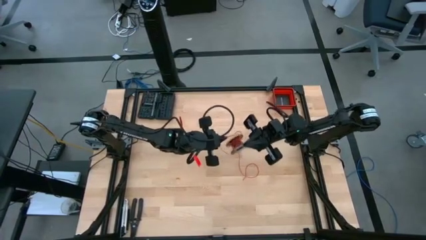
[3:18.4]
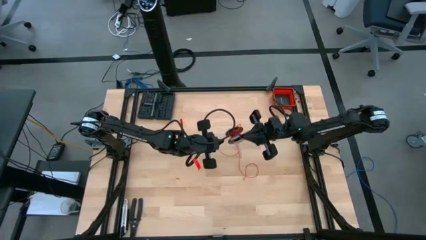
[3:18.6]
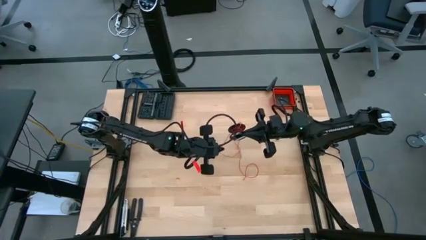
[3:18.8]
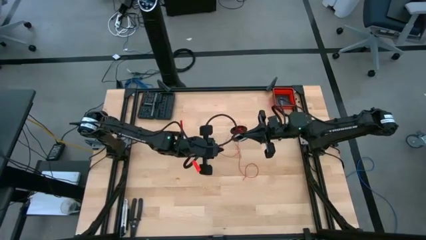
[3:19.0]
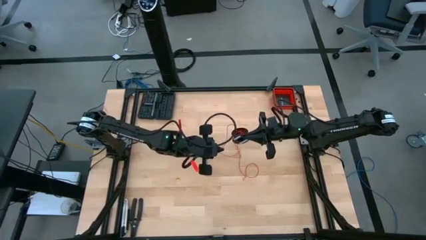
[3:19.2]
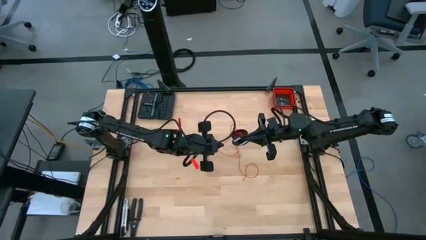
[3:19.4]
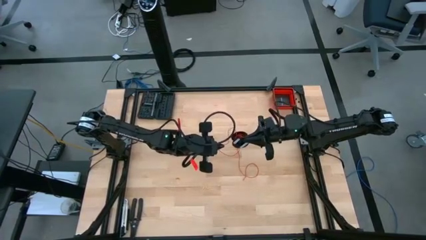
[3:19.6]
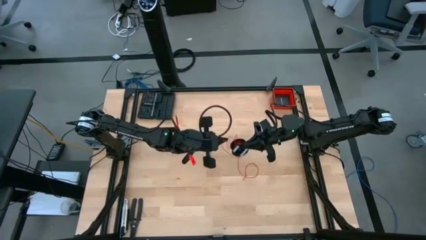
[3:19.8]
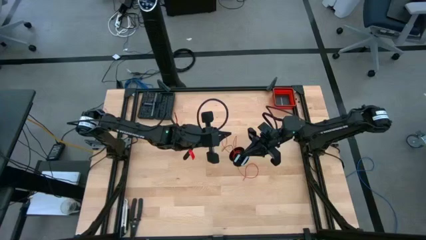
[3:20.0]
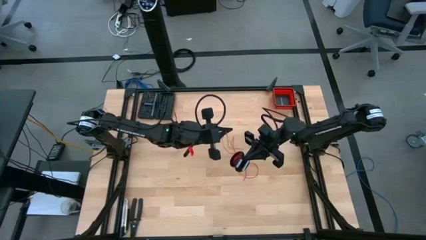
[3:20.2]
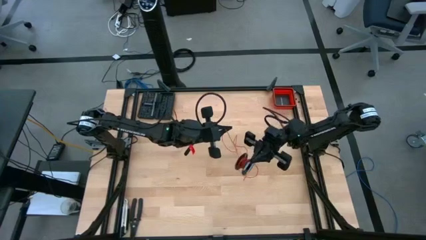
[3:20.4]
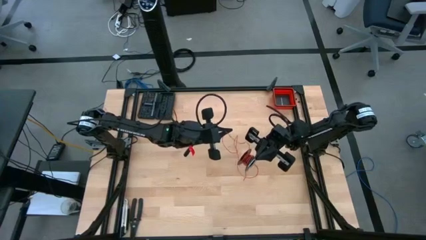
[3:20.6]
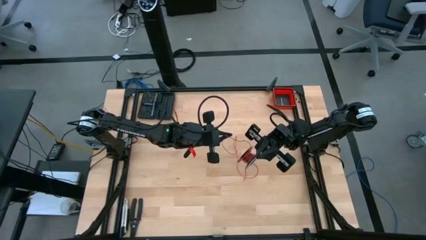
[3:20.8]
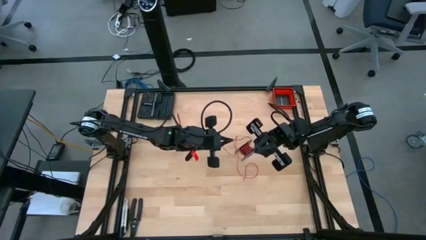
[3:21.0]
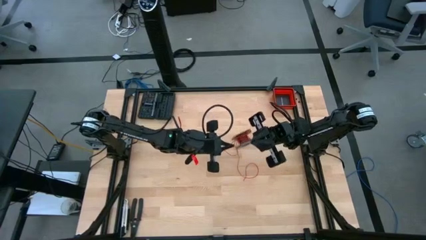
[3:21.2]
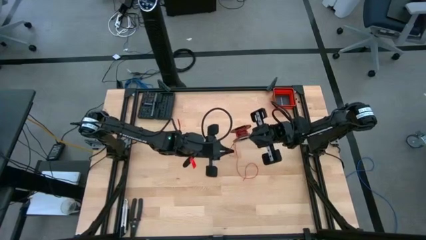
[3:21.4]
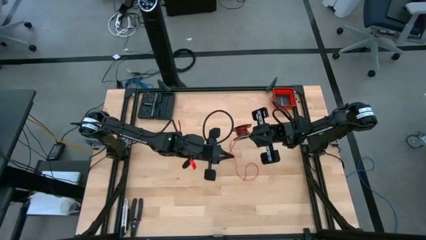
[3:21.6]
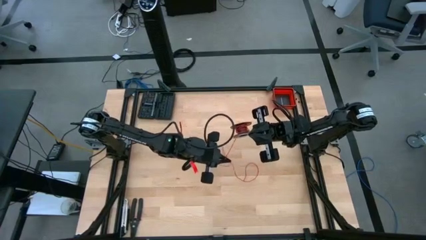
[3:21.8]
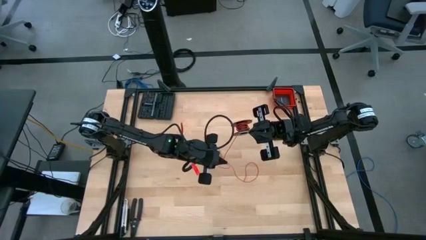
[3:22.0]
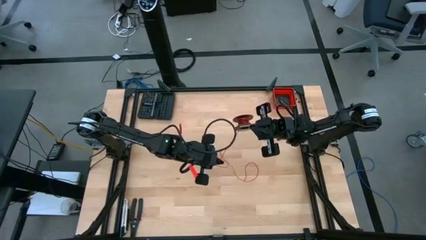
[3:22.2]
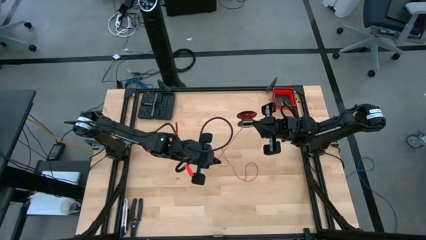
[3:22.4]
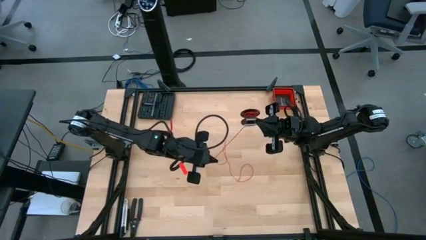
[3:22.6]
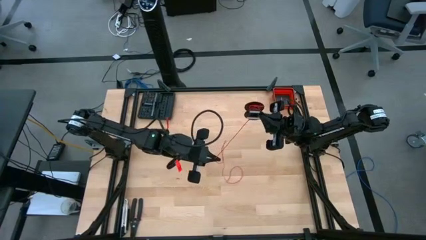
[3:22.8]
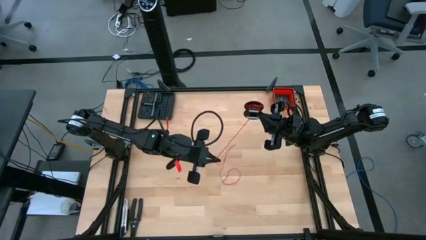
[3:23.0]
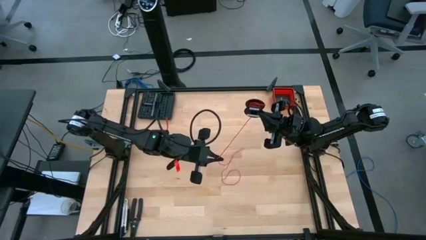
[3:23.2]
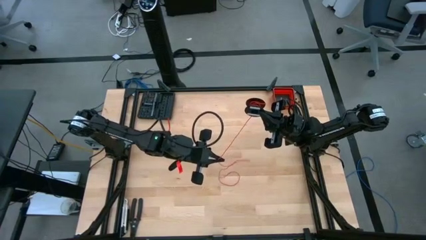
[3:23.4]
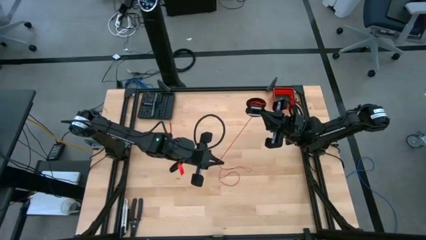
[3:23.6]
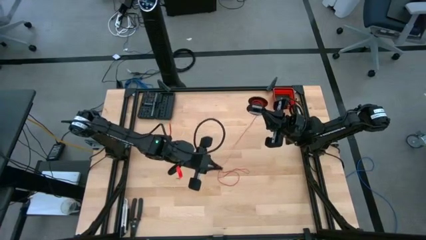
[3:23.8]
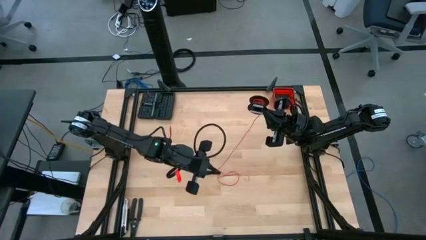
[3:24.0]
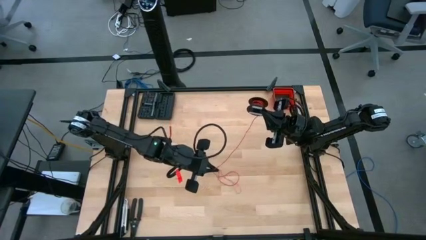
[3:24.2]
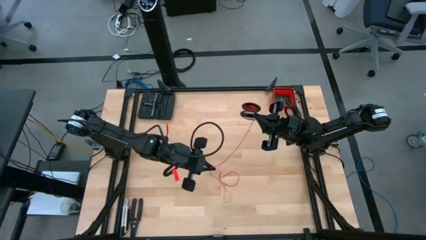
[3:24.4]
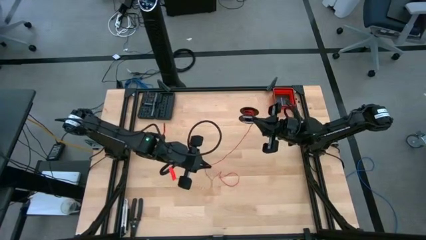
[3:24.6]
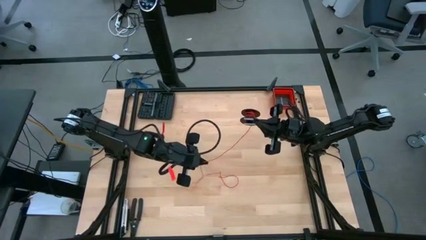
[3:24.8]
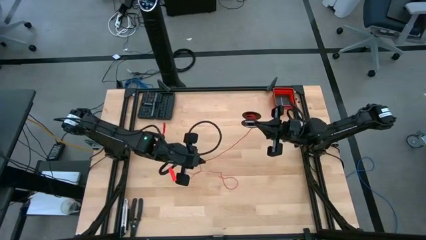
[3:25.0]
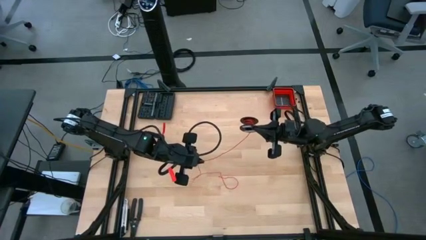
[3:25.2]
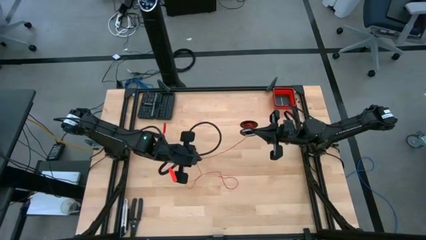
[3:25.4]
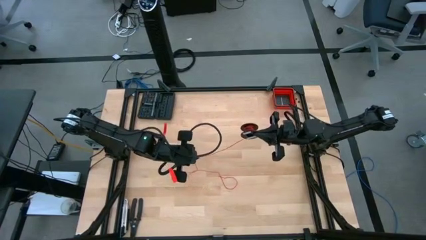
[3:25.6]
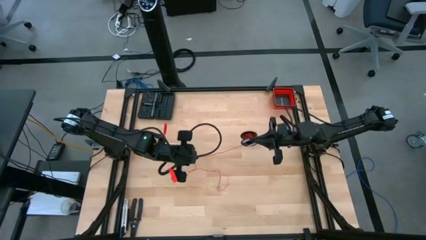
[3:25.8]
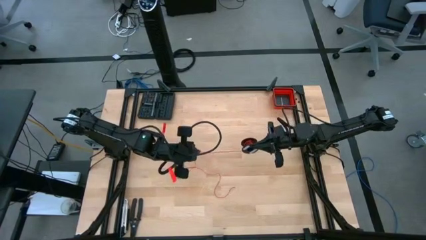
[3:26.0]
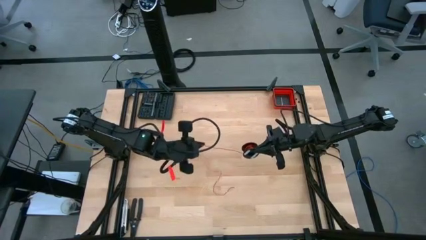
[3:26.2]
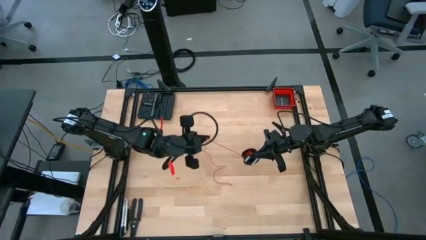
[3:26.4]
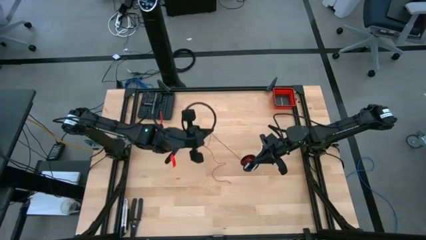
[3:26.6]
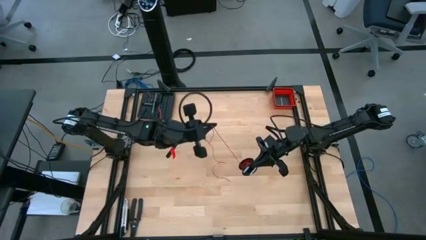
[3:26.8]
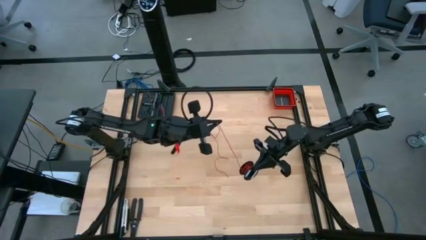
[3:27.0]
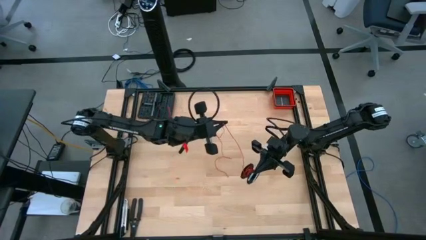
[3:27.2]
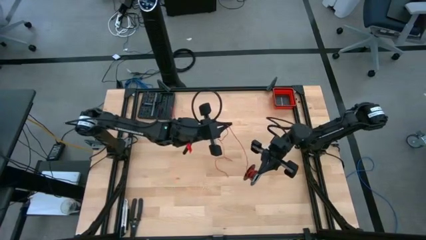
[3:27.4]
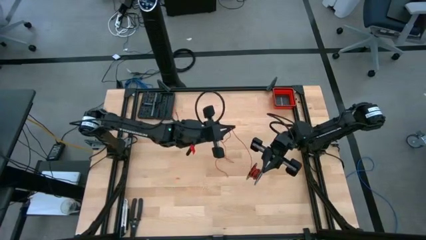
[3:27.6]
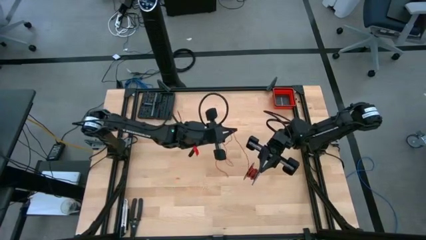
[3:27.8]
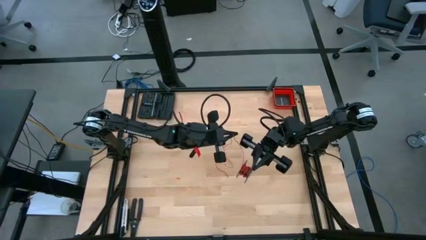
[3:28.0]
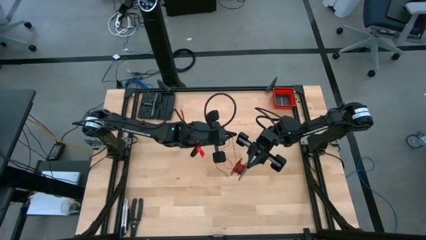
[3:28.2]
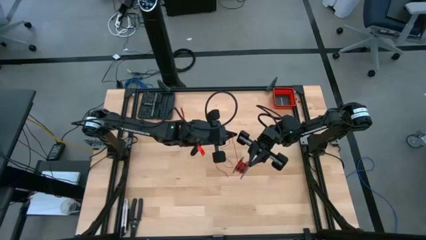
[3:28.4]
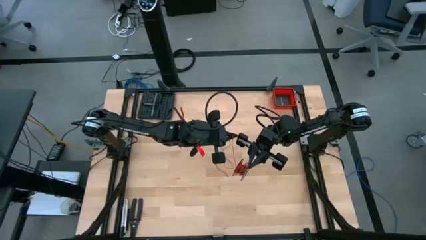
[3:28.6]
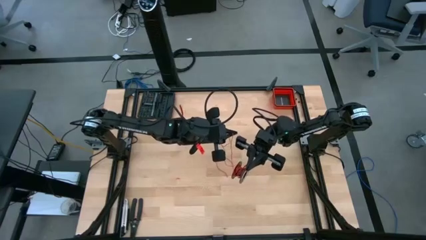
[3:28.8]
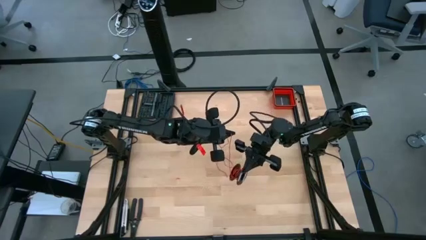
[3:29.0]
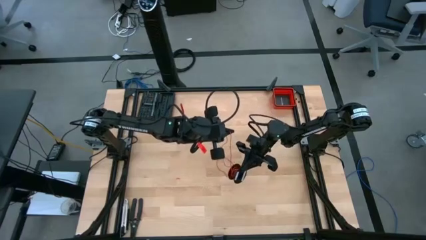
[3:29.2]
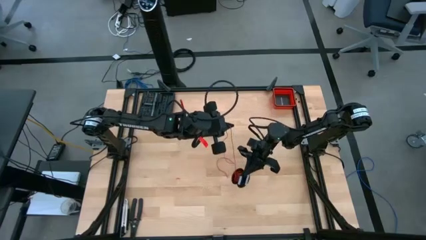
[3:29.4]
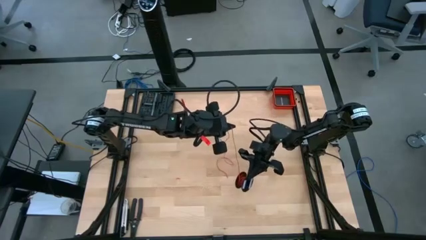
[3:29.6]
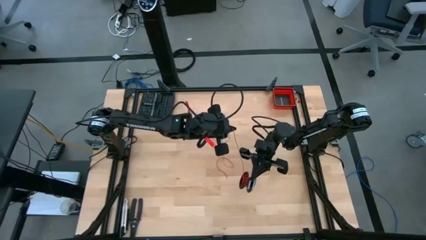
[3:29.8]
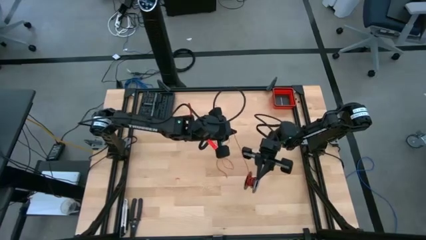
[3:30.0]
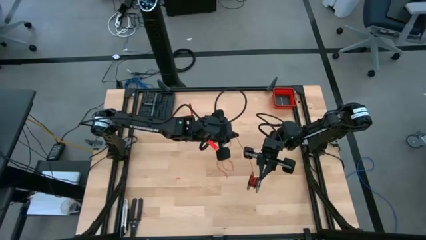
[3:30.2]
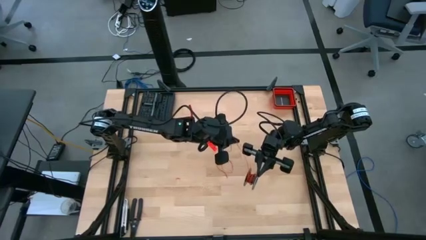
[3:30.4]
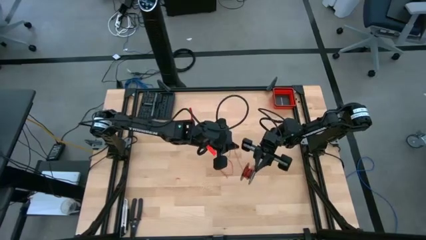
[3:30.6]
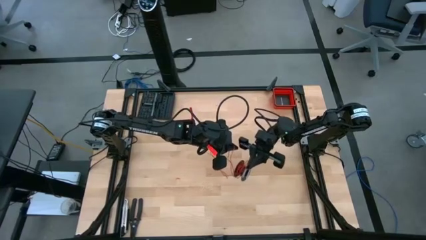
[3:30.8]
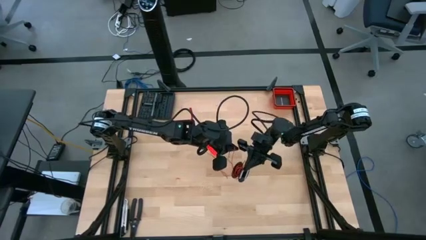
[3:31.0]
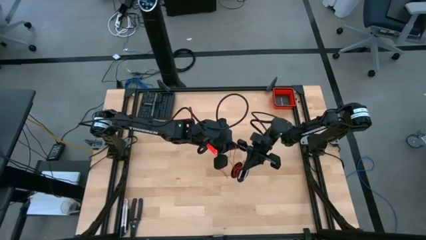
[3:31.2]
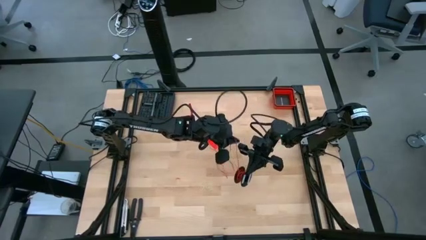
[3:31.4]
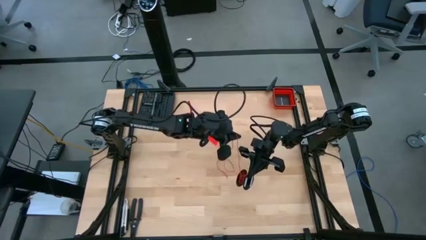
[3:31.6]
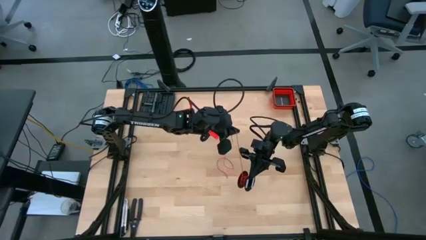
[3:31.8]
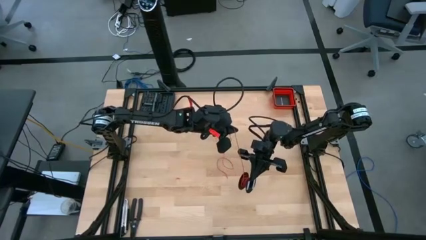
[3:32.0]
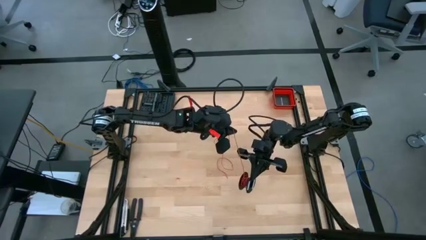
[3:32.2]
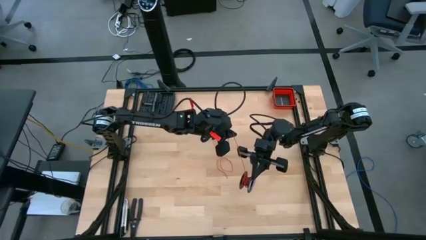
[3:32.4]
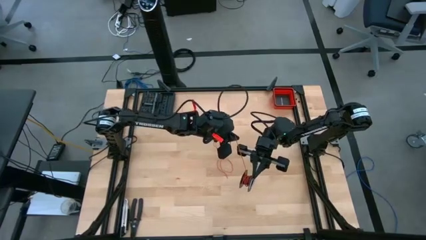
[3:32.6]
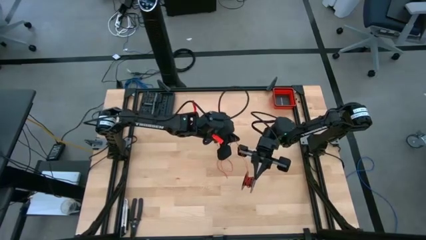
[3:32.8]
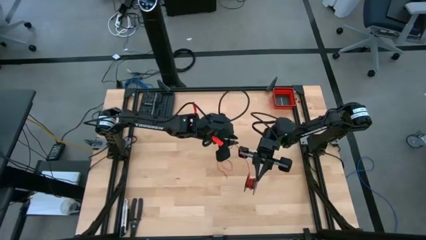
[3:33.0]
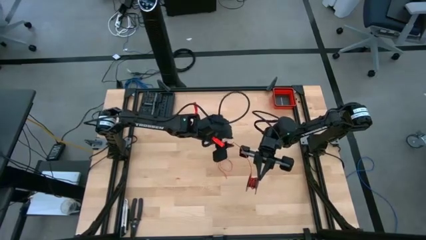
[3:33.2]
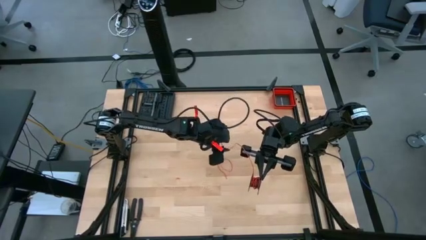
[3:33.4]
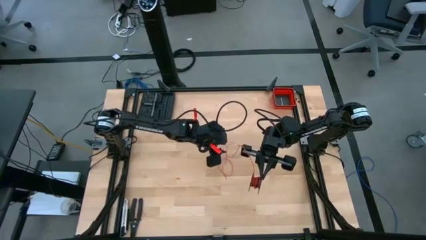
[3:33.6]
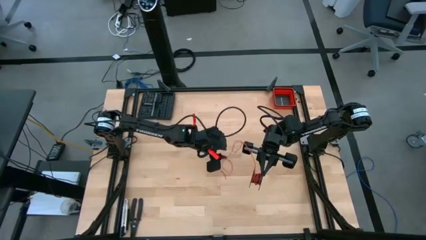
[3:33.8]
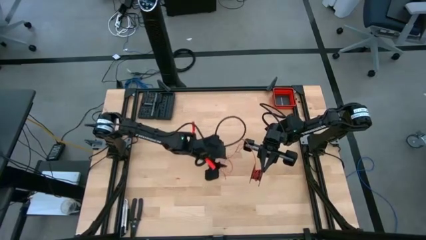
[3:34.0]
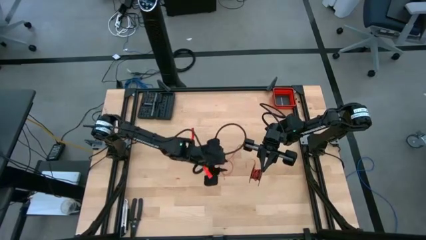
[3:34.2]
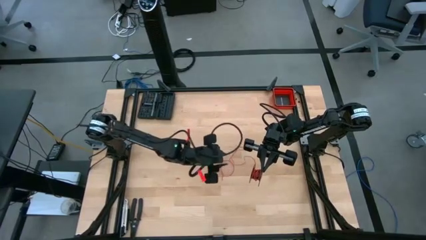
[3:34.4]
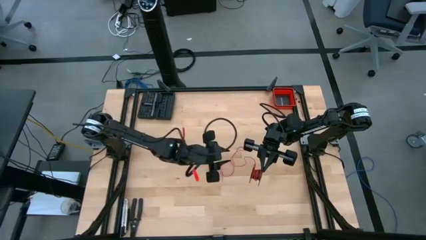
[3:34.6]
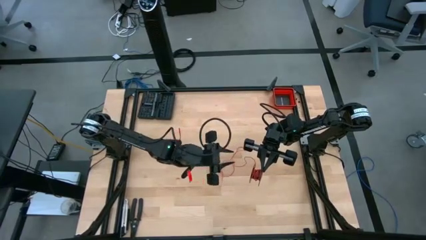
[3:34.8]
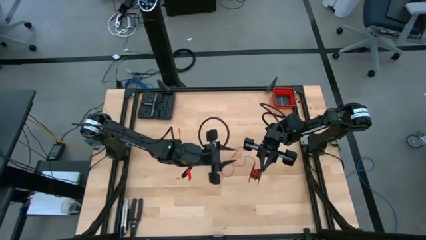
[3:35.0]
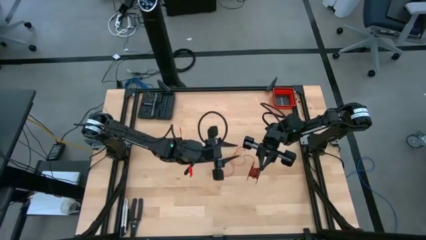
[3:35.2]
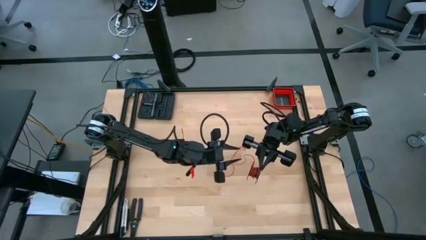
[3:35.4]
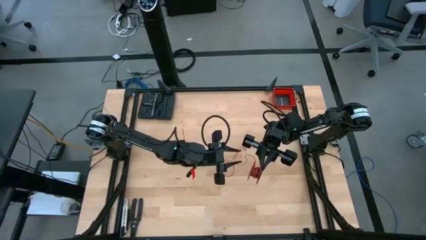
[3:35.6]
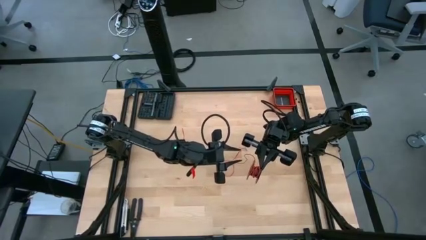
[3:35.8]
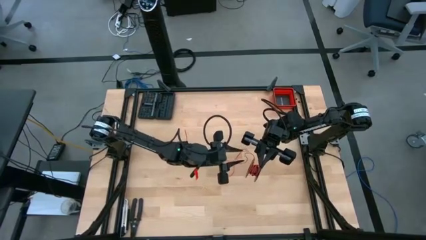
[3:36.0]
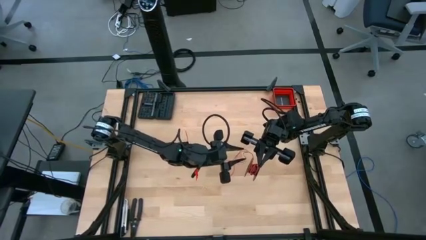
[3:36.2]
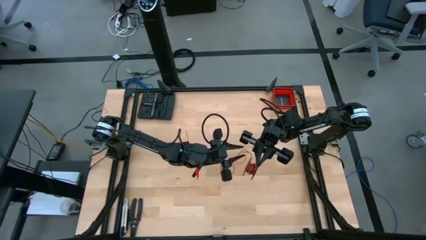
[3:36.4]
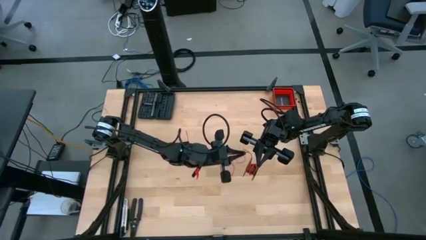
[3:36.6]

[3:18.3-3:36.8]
Task: Coil cords
Coil the red wire on the black spool
